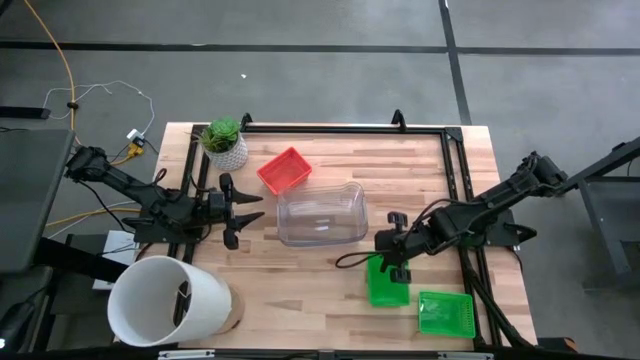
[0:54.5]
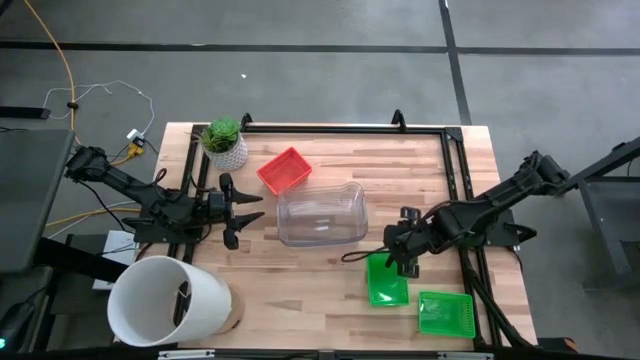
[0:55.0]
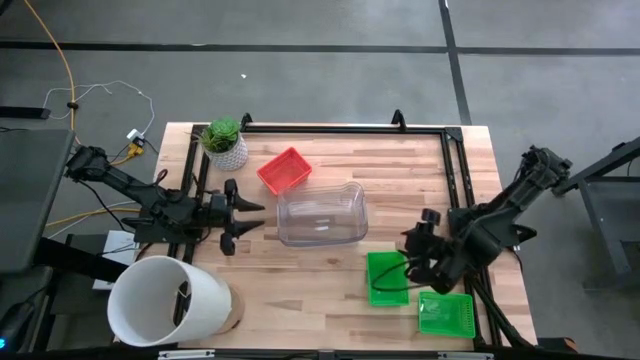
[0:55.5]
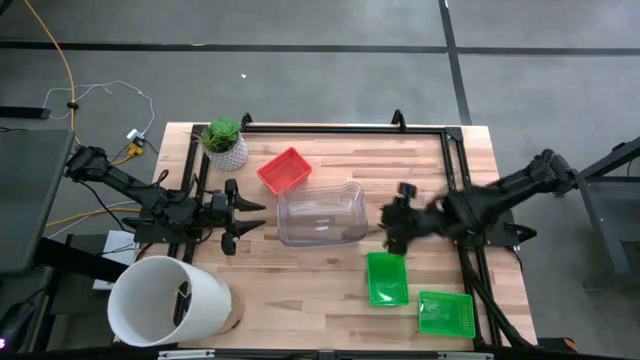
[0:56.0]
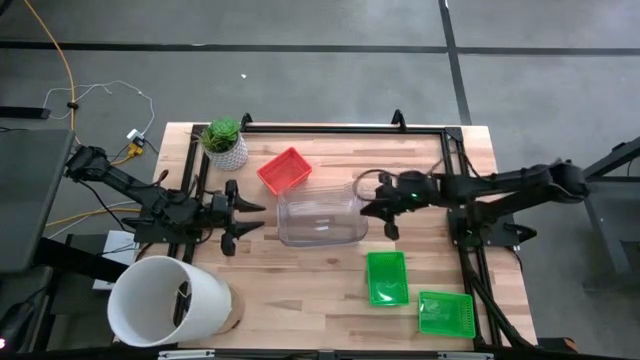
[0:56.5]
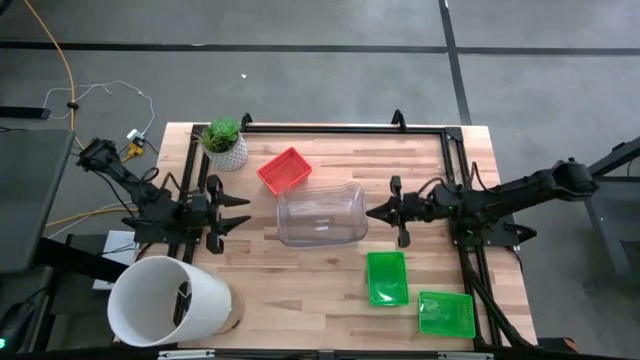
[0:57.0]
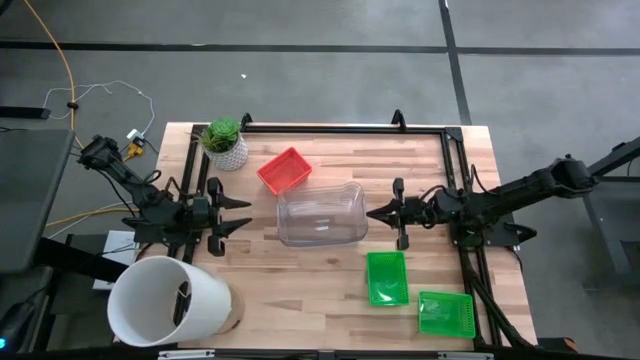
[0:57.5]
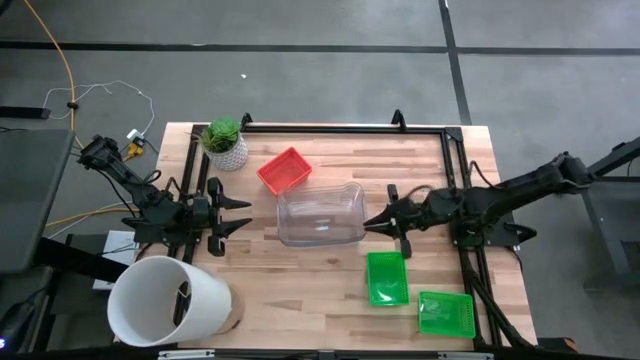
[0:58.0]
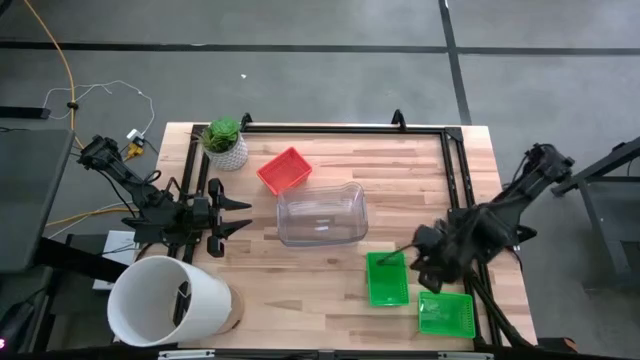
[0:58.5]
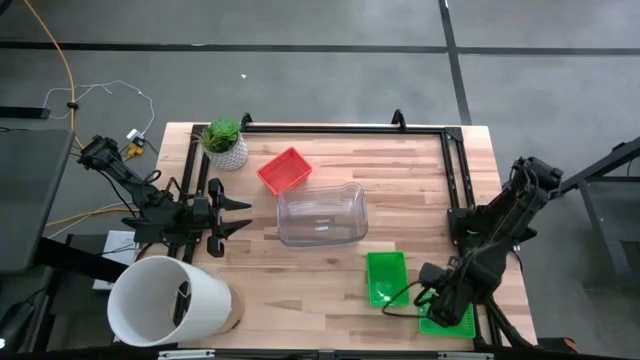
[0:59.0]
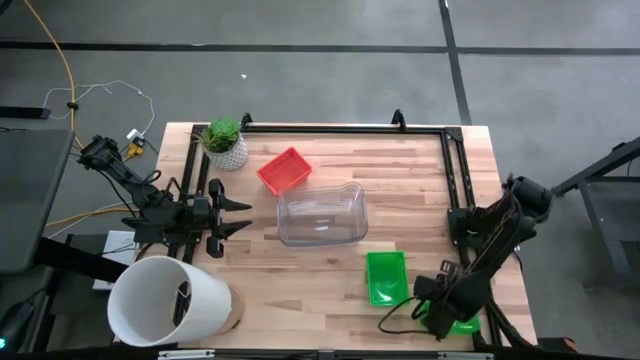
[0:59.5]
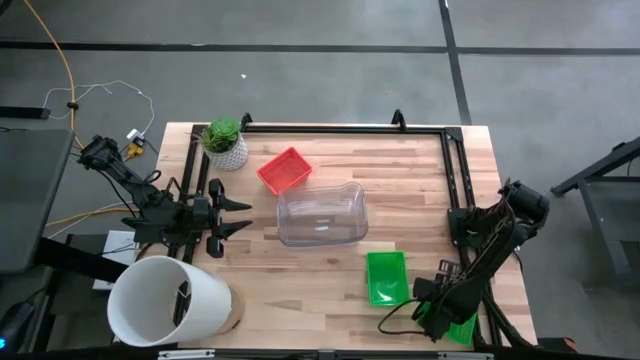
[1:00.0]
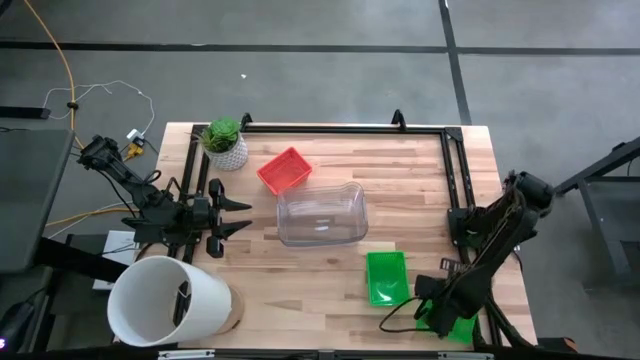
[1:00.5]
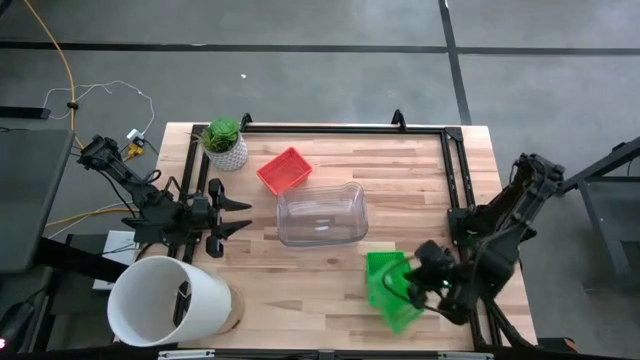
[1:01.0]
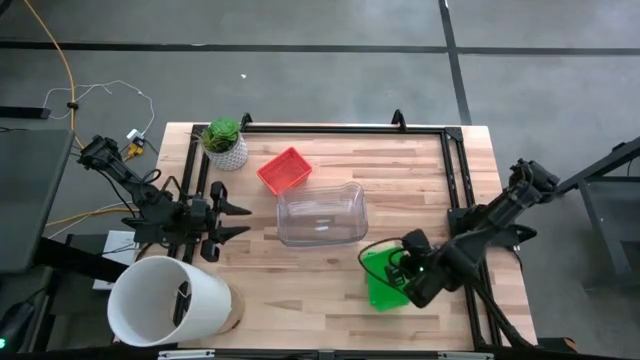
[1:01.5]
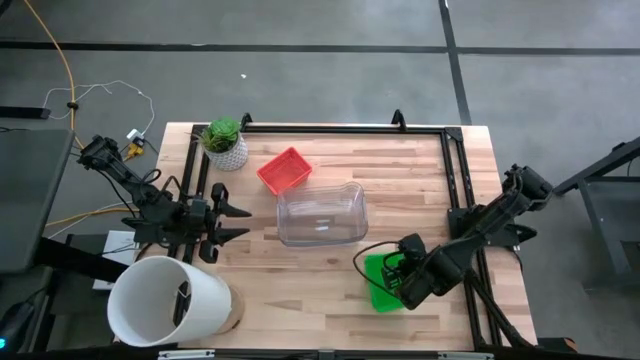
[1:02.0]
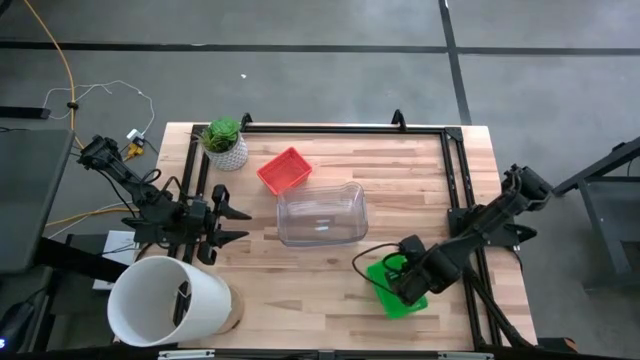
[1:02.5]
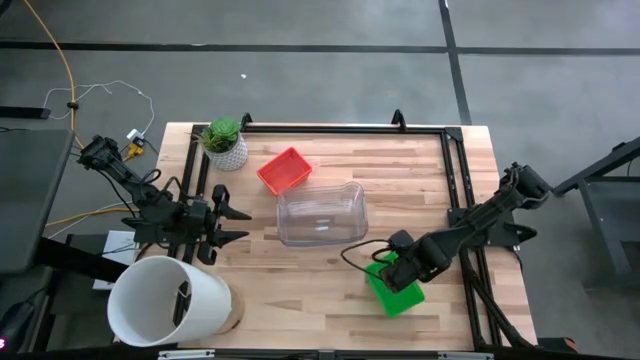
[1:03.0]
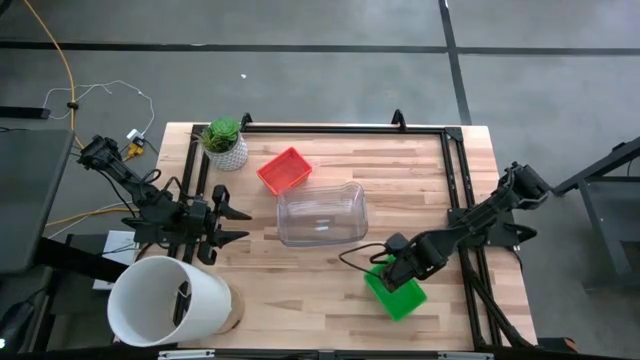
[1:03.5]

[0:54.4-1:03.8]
Stack the bottom green bin on the top green bins

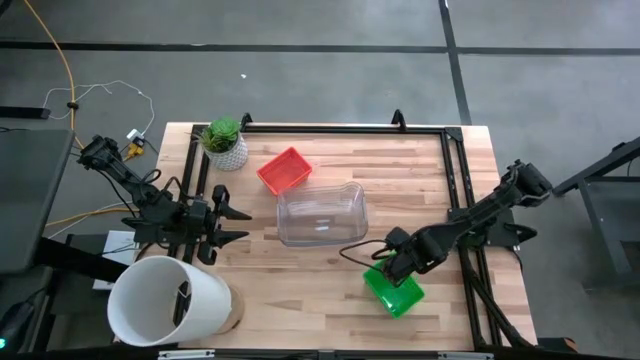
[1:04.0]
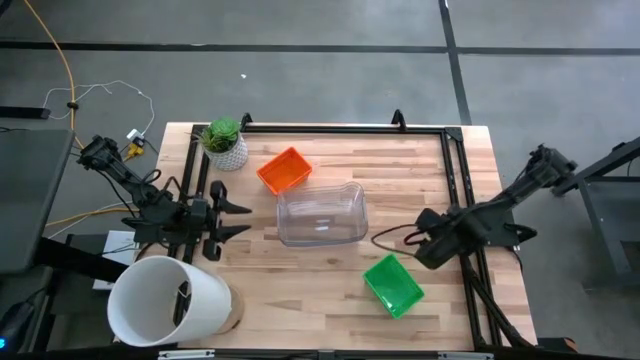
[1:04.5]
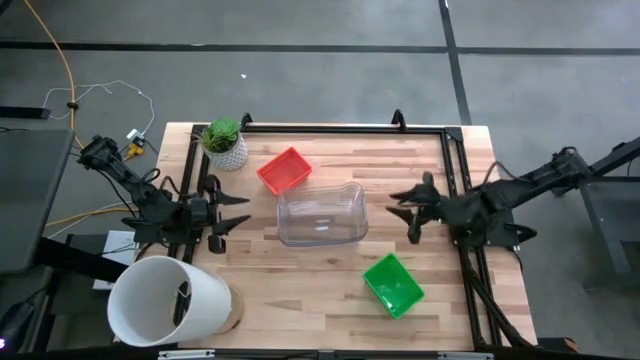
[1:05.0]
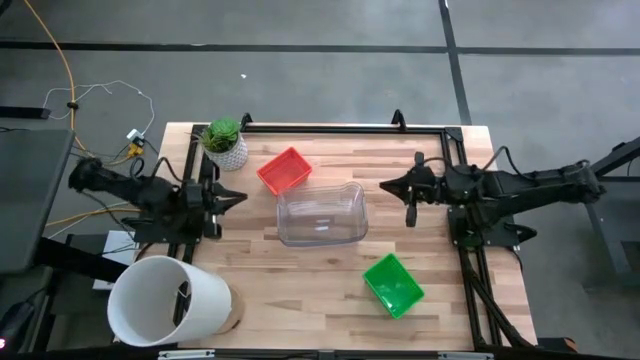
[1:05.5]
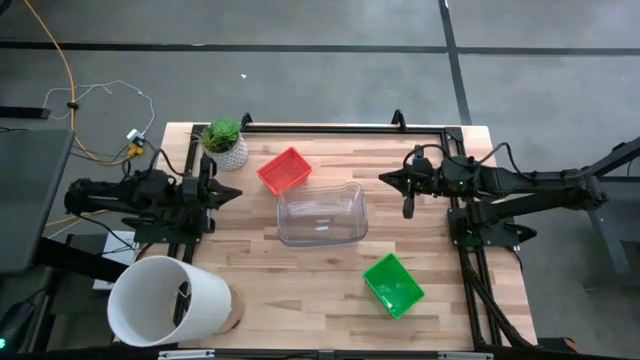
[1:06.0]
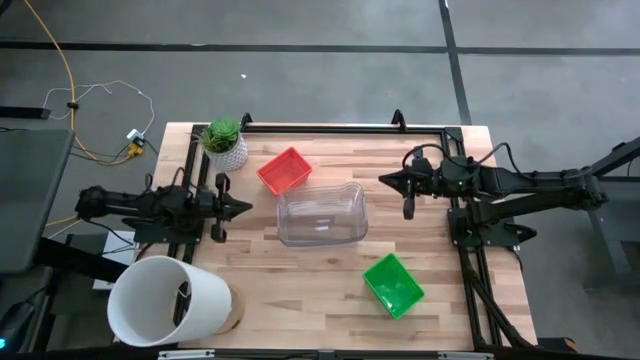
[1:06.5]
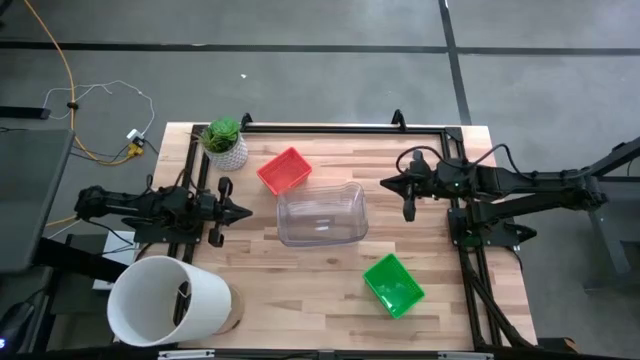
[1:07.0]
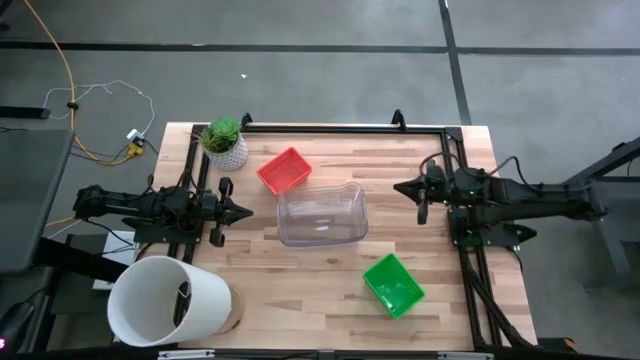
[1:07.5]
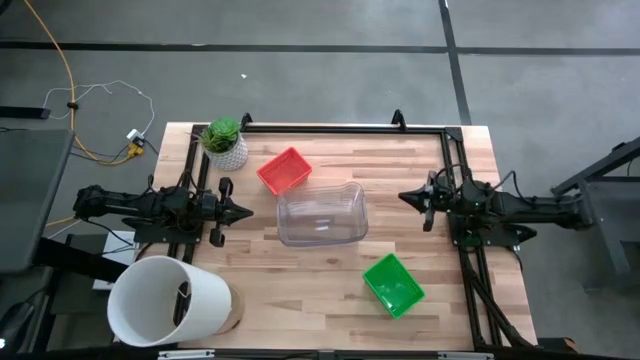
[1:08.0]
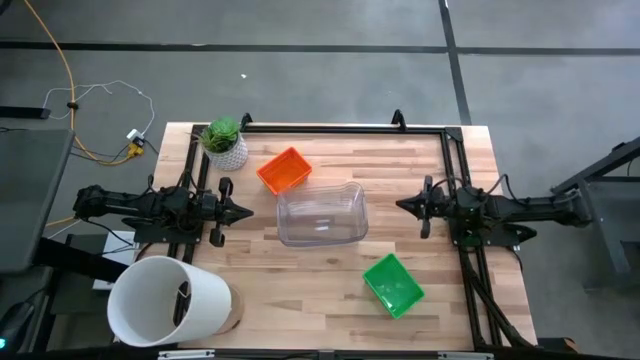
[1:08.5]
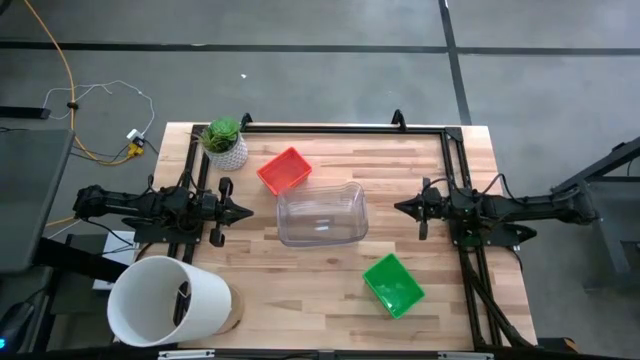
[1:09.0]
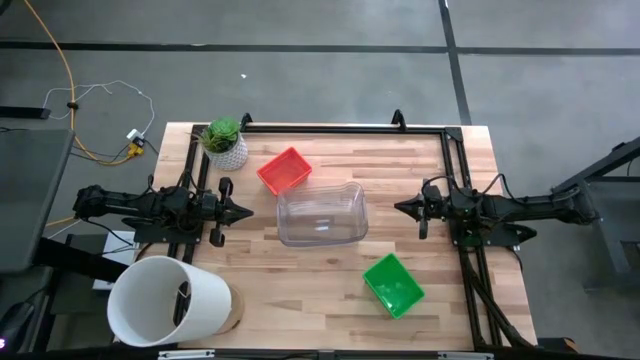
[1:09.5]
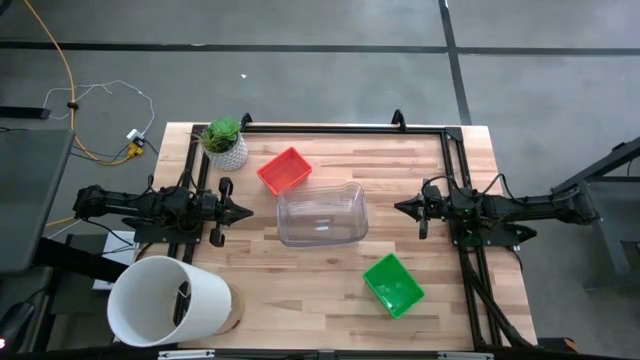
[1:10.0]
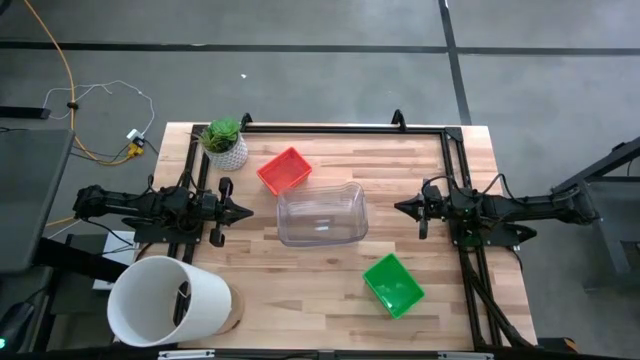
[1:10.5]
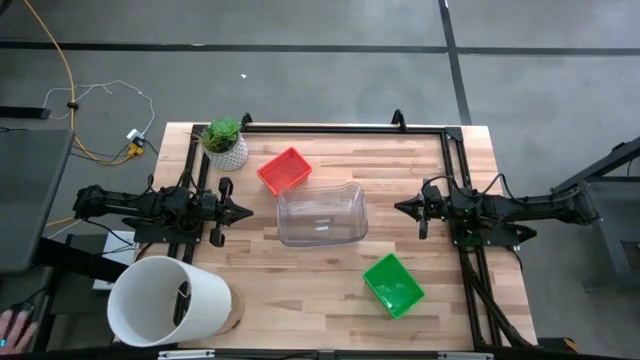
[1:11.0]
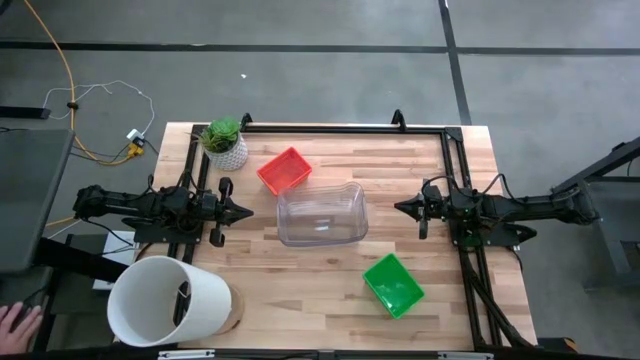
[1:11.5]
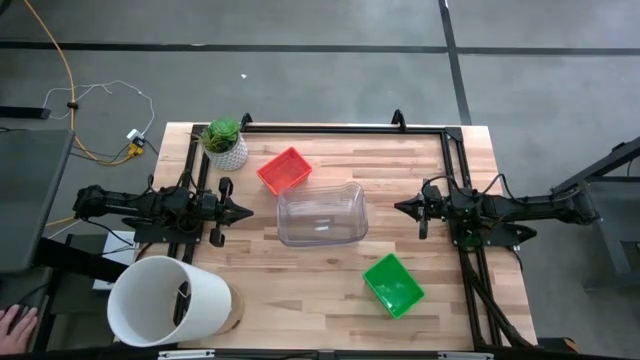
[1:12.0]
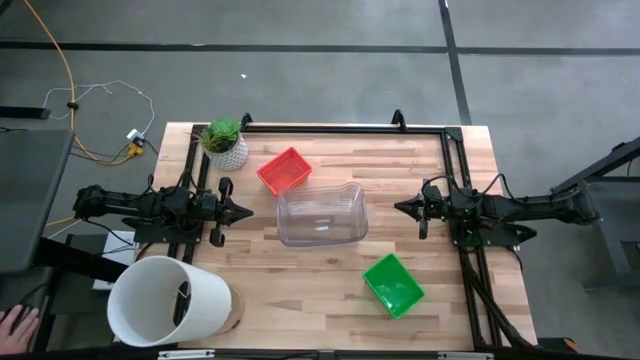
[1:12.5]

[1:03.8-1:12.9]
Return to Home Position
